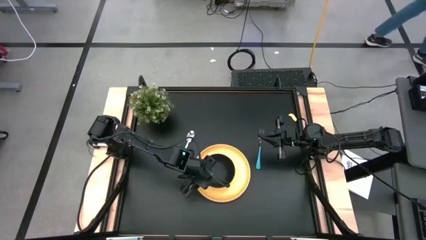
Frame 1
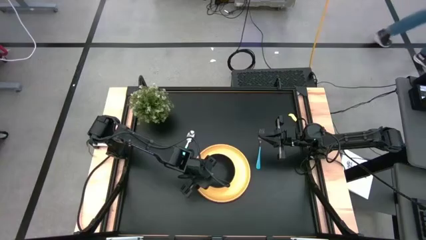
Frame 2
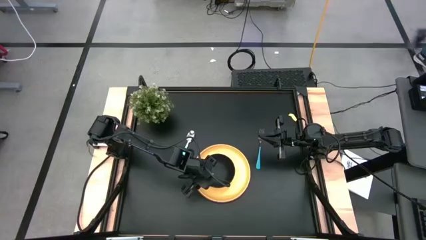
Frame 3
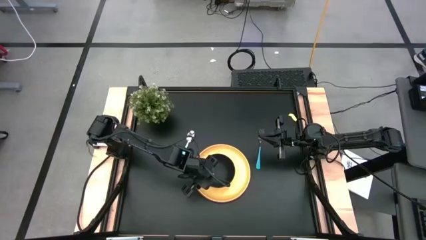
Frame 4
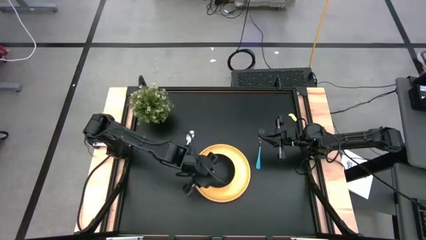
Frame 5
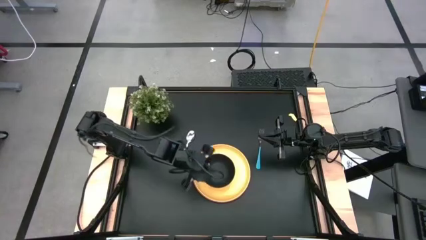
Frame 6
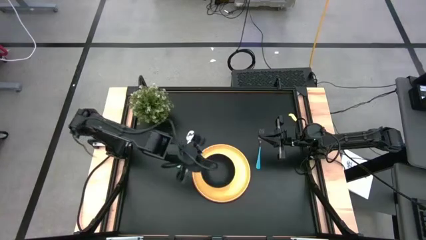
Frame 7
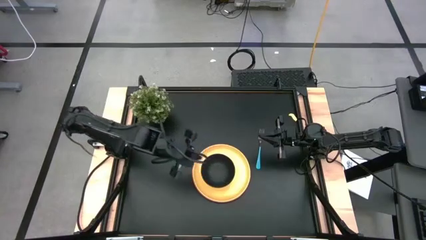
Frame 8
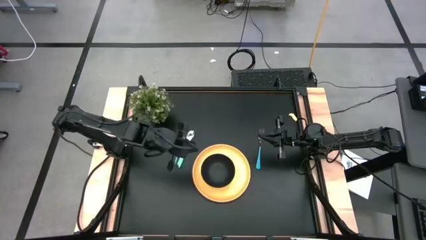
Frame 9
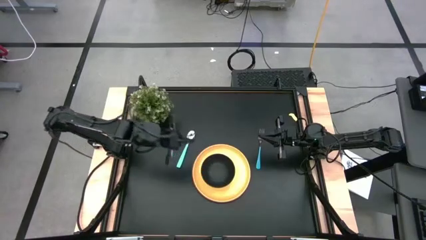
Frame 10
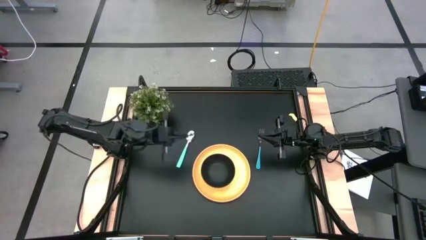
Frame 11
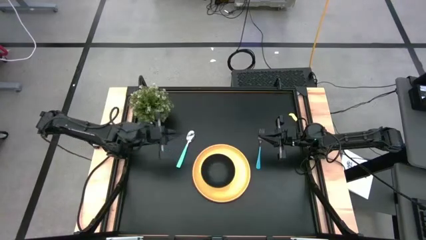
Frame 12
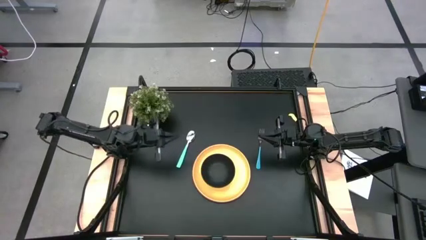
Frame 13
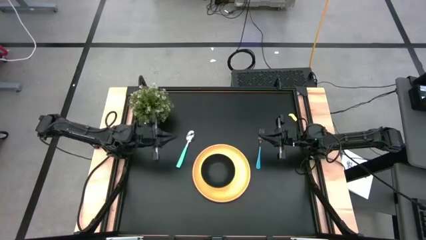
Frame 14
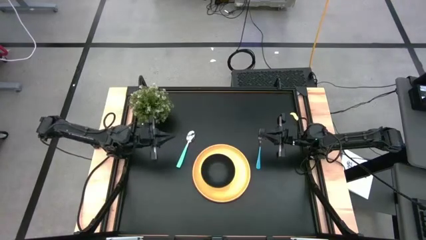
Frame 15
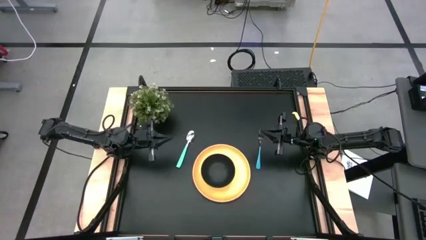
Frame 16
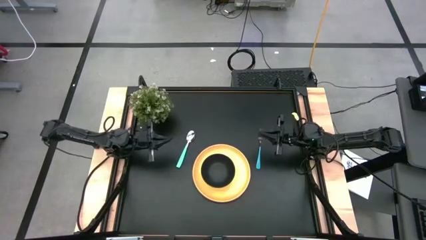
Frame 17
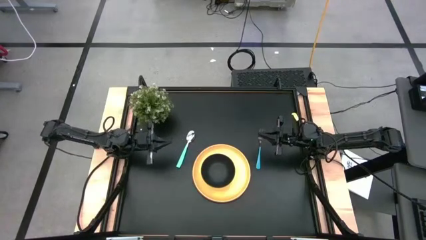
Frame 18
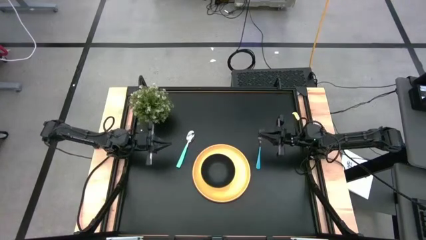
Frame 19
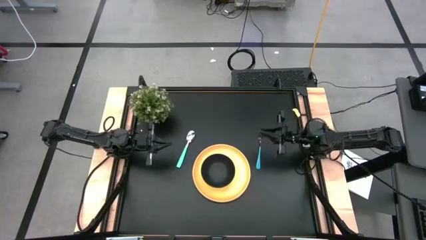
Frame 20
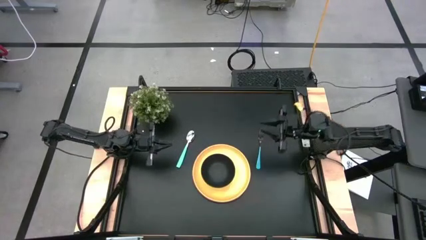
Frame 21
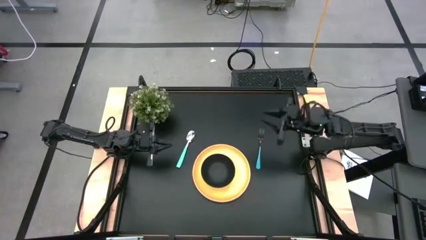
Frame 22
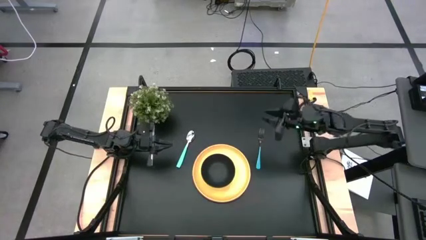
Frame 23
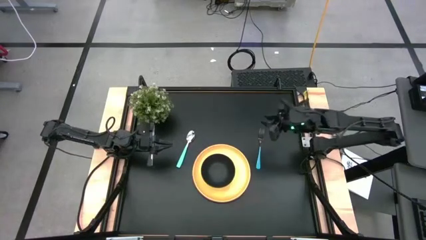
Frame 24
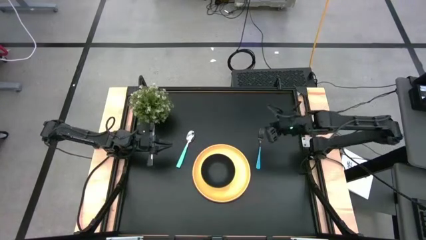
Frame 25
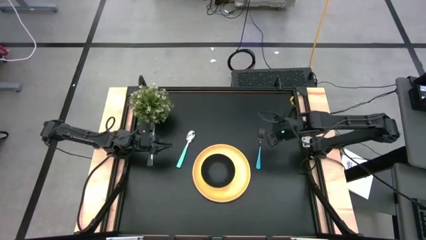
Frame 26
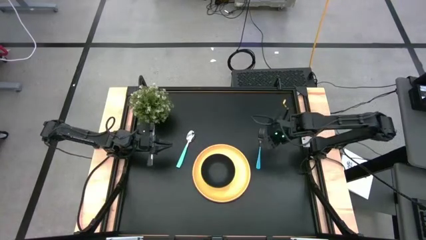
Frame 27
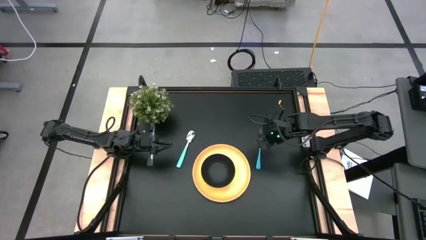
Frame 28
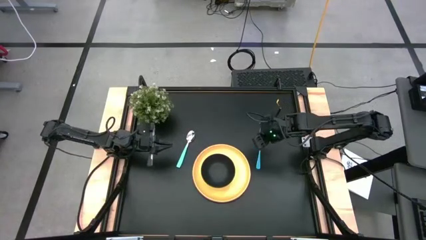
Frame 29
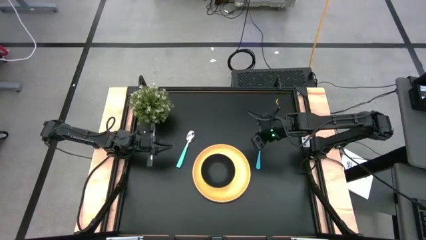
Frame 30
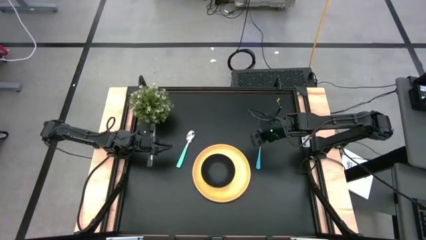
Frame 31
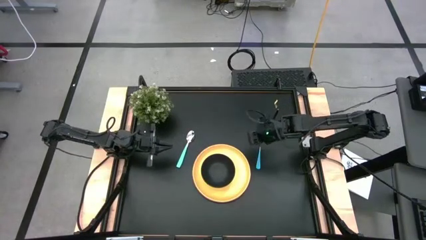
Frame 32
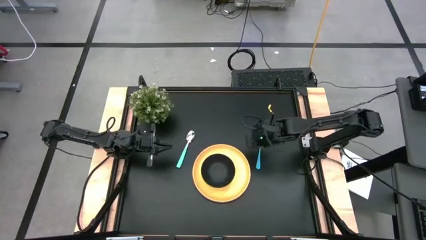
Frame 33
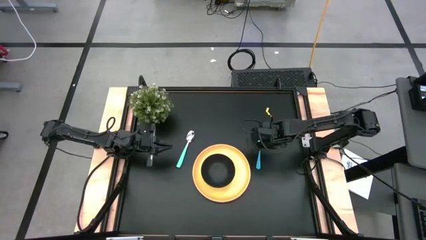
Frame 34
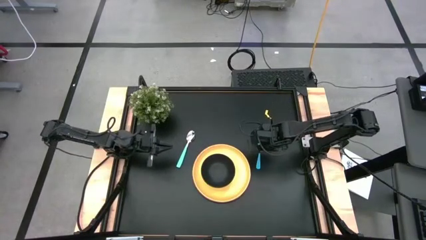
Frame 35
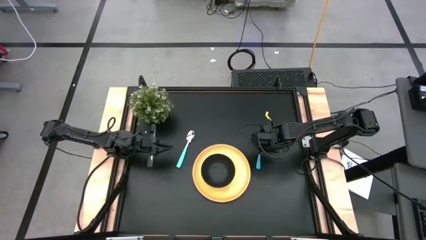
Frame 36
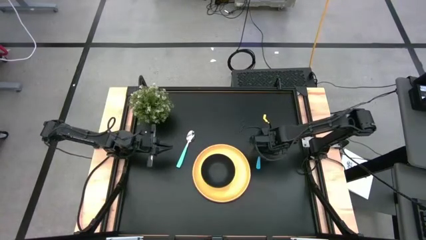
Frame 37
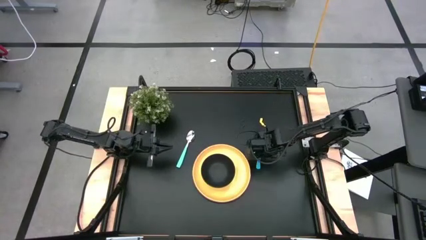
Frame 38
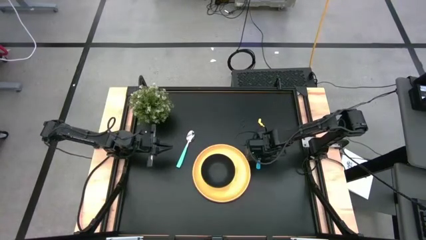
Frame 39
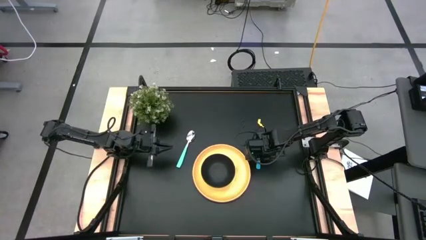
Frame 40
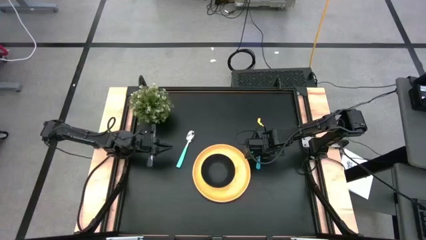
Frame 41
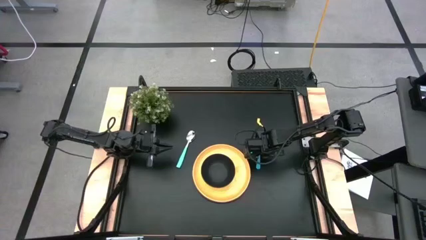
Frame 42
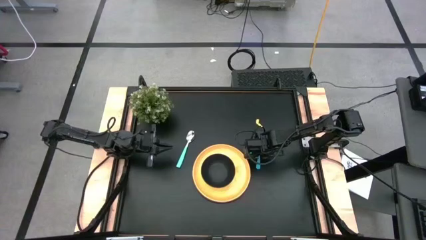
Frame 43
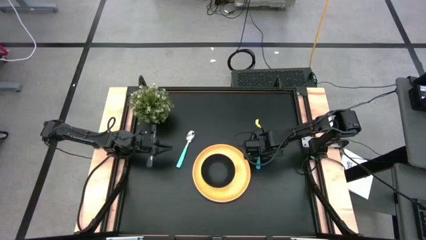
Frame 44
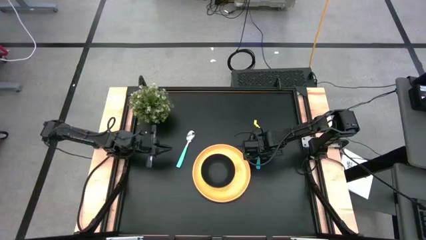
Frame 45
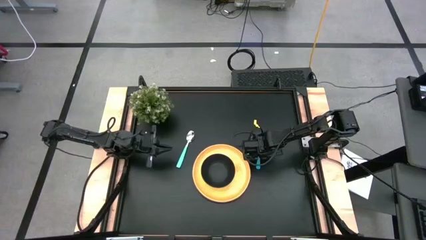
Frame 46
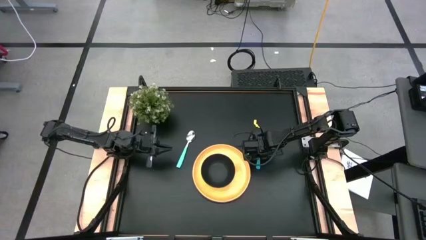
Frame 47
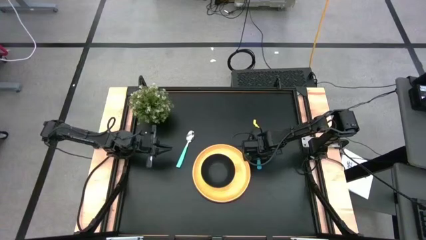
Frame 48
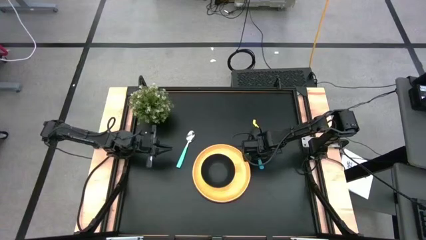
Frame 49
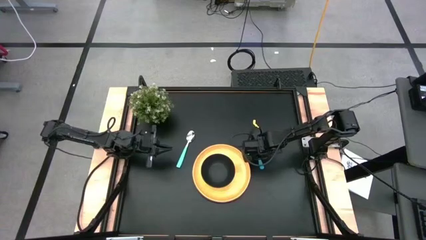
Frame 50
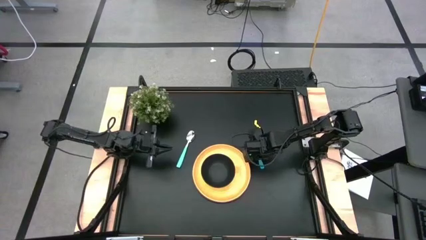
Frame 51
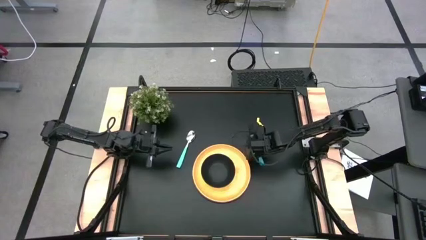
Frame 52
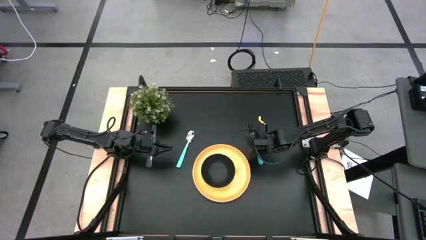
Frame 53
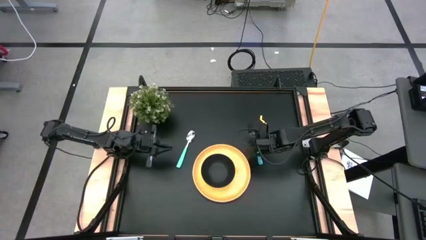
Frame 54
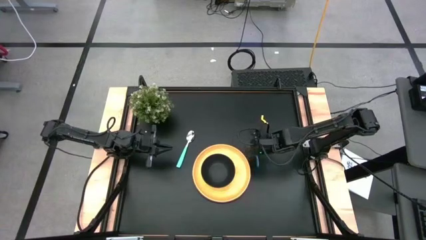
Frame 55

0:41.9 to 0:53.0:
Task: Set table place
Put the blue fork on the yellow plate to the right of the black bowl
